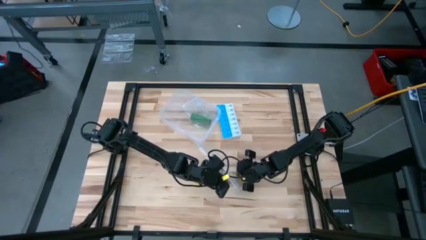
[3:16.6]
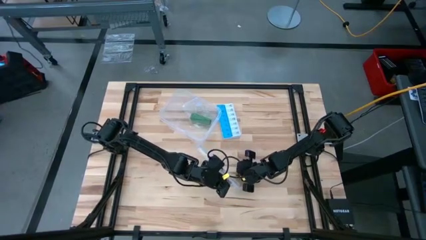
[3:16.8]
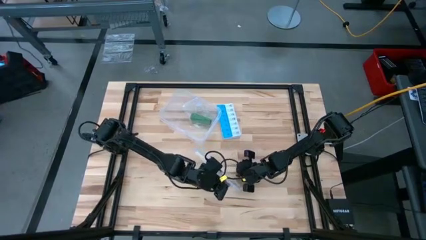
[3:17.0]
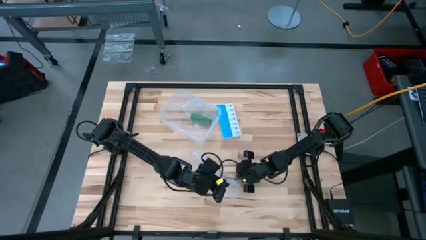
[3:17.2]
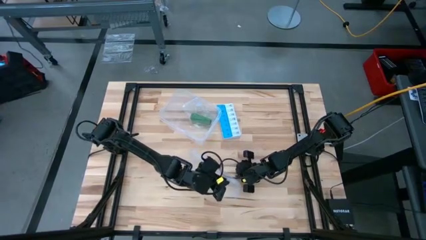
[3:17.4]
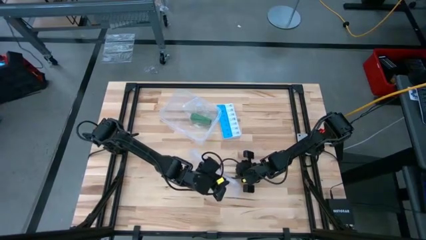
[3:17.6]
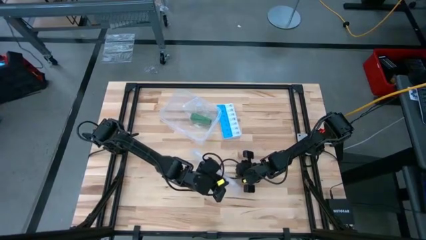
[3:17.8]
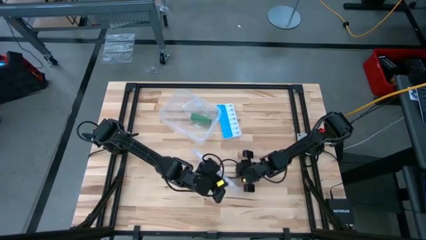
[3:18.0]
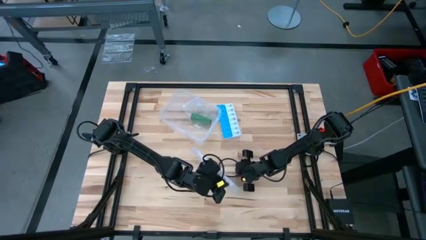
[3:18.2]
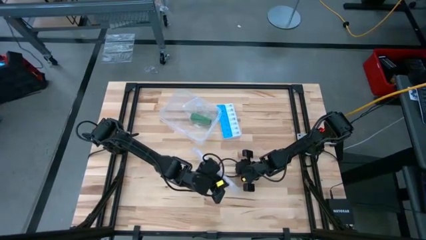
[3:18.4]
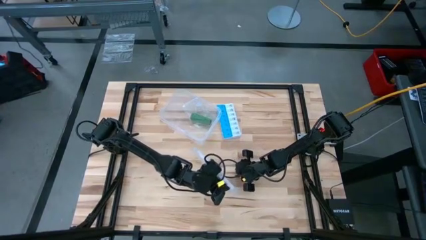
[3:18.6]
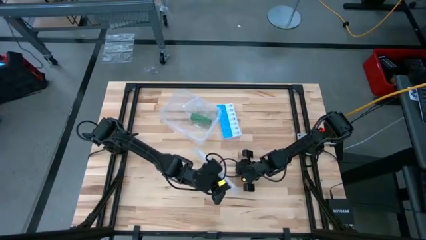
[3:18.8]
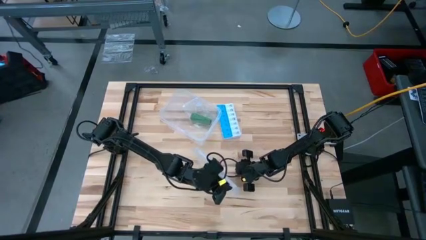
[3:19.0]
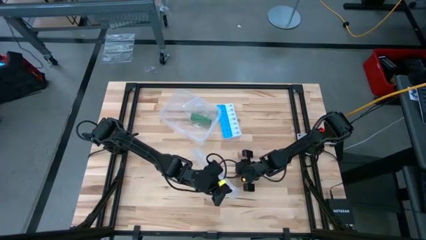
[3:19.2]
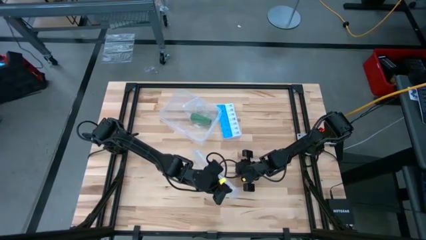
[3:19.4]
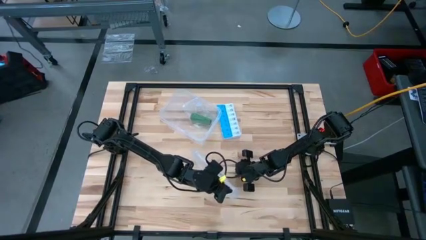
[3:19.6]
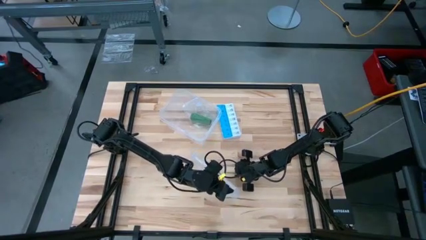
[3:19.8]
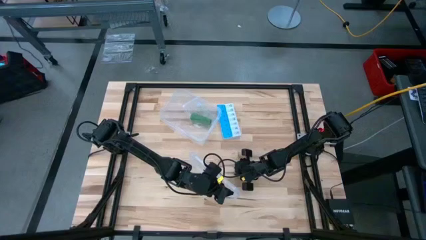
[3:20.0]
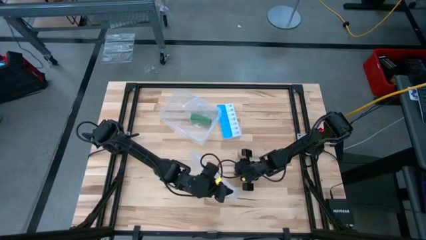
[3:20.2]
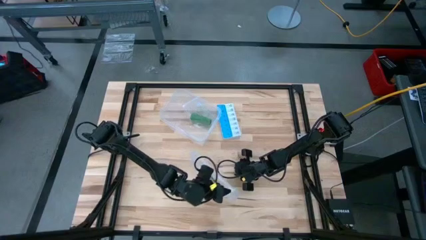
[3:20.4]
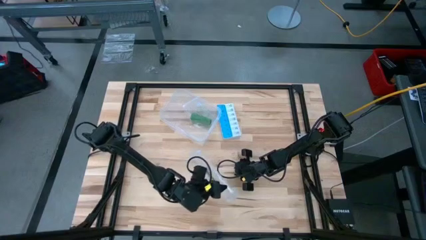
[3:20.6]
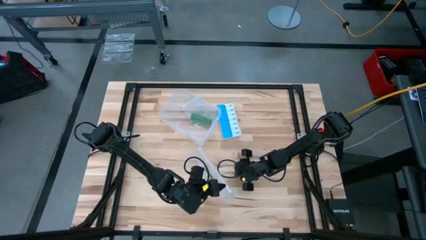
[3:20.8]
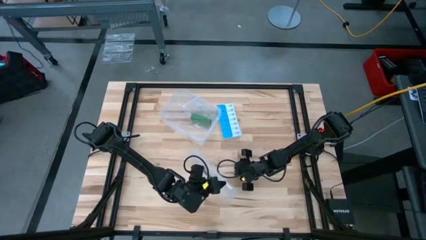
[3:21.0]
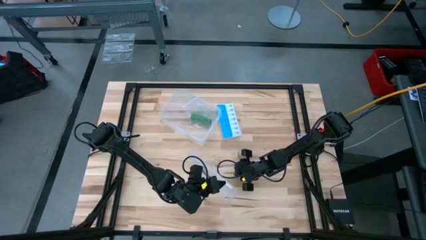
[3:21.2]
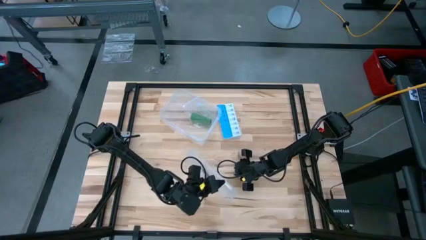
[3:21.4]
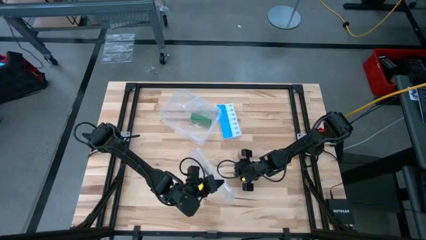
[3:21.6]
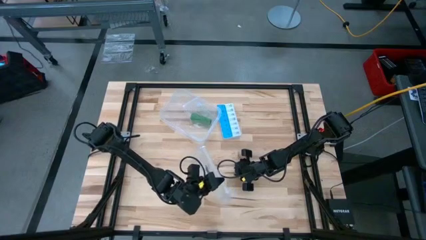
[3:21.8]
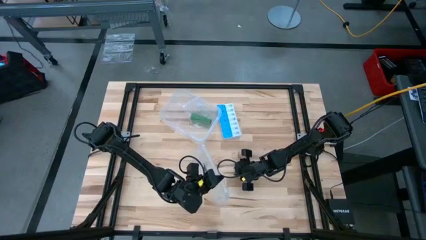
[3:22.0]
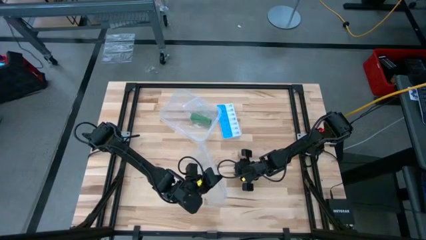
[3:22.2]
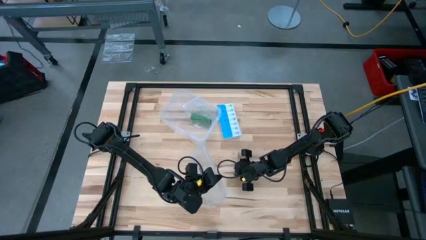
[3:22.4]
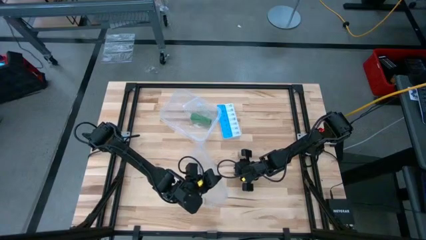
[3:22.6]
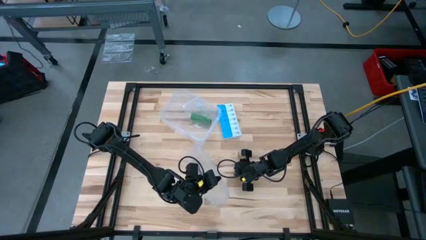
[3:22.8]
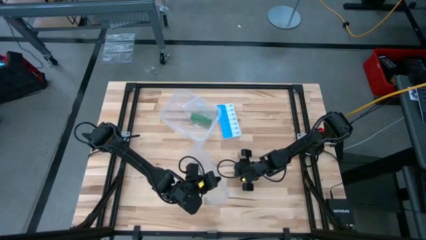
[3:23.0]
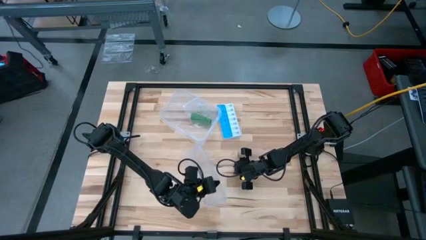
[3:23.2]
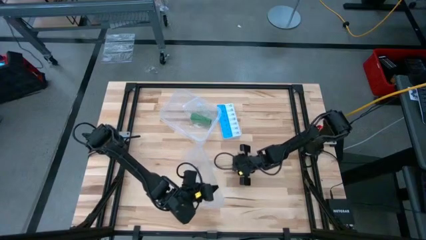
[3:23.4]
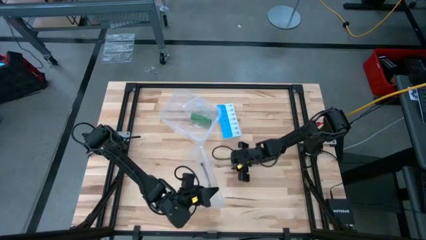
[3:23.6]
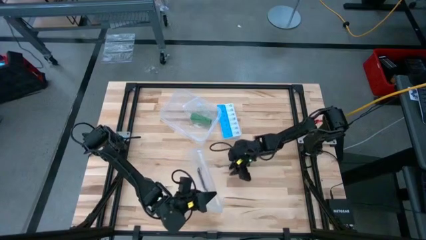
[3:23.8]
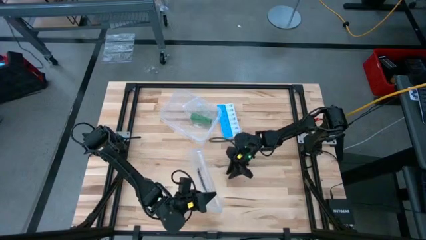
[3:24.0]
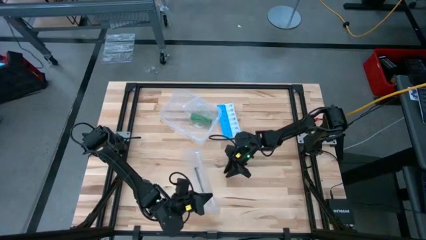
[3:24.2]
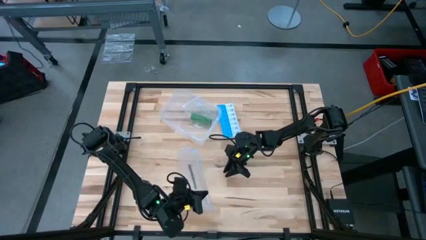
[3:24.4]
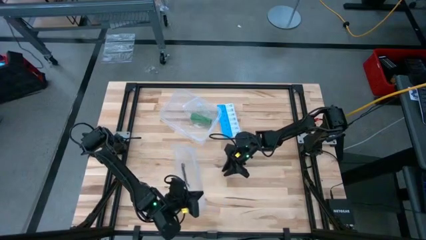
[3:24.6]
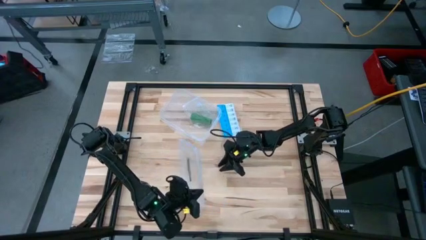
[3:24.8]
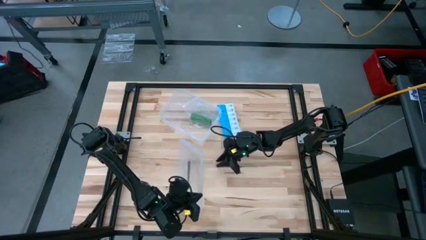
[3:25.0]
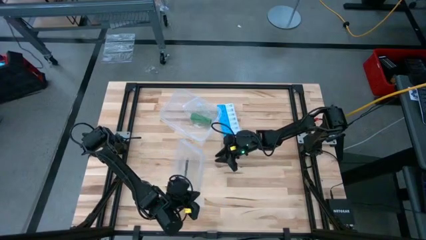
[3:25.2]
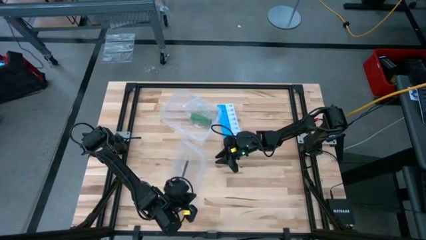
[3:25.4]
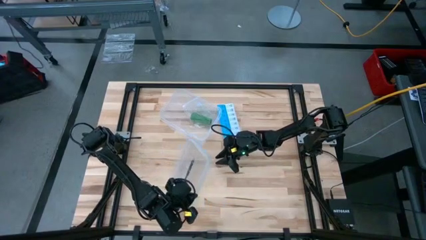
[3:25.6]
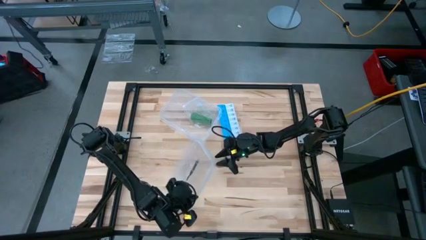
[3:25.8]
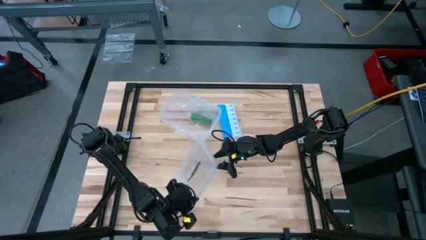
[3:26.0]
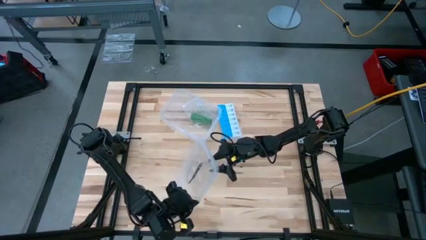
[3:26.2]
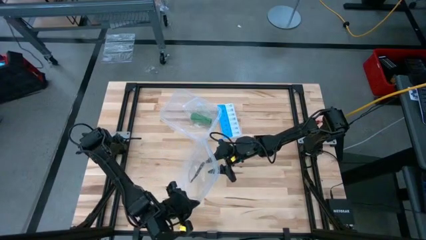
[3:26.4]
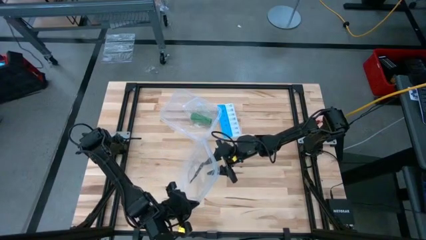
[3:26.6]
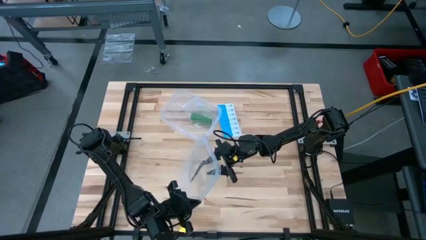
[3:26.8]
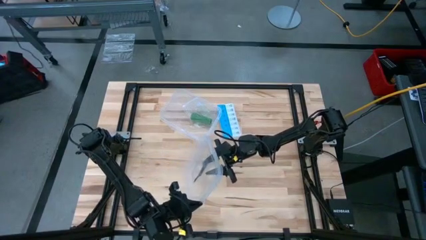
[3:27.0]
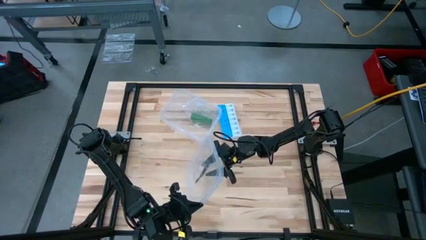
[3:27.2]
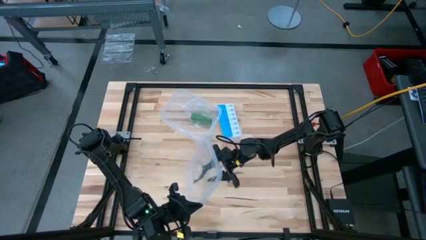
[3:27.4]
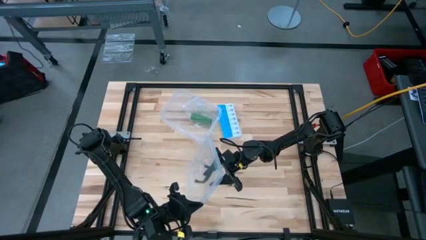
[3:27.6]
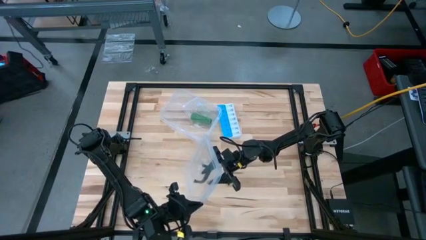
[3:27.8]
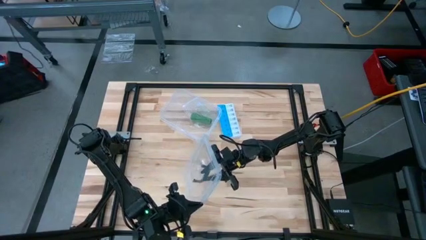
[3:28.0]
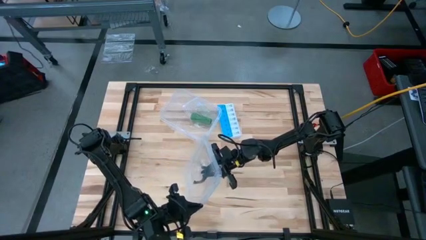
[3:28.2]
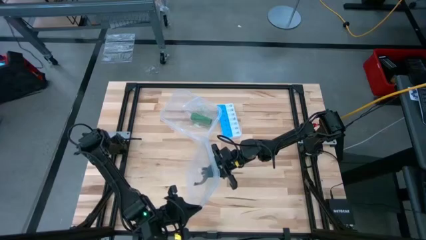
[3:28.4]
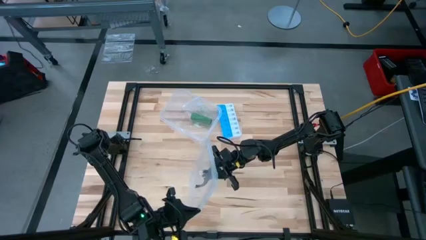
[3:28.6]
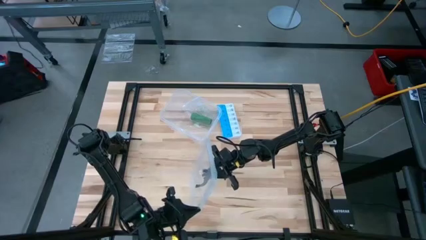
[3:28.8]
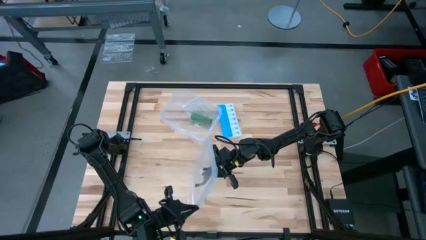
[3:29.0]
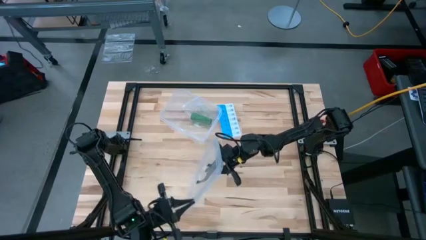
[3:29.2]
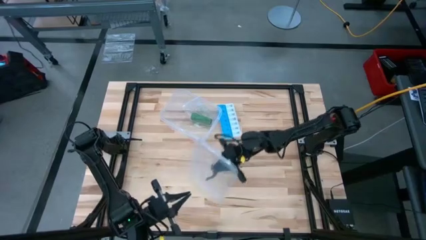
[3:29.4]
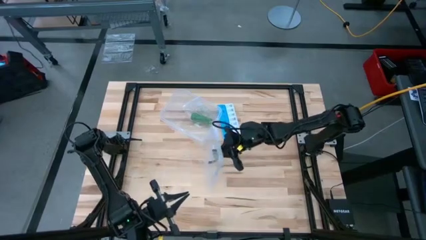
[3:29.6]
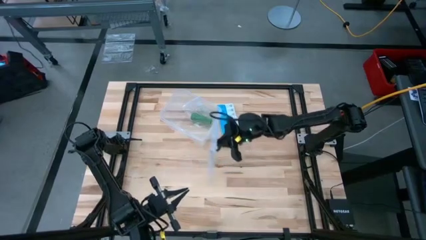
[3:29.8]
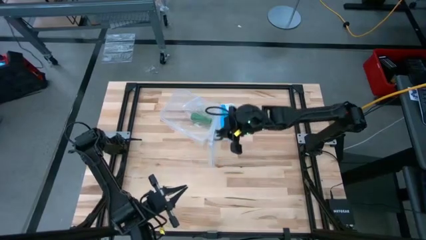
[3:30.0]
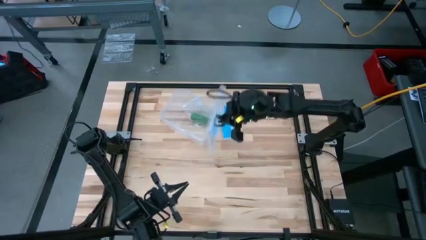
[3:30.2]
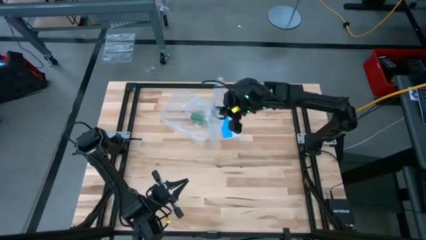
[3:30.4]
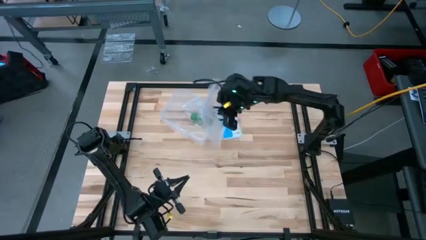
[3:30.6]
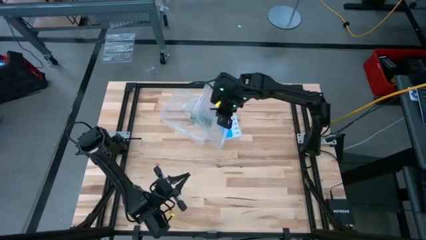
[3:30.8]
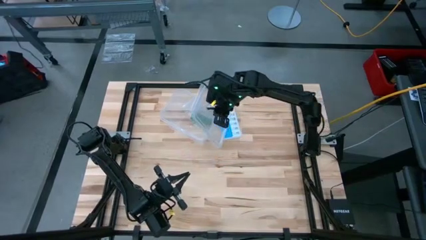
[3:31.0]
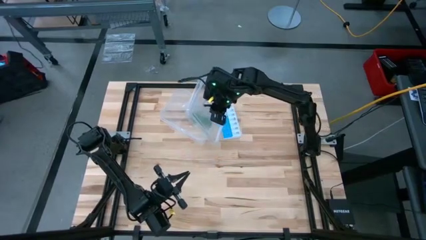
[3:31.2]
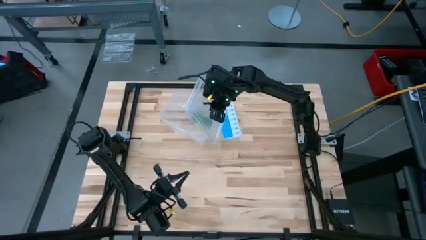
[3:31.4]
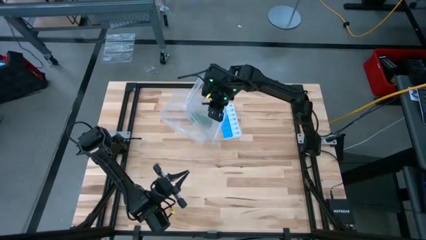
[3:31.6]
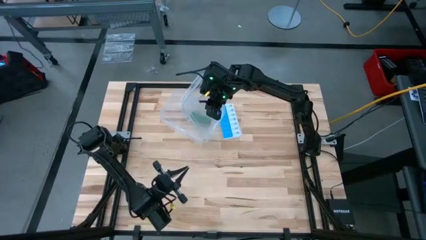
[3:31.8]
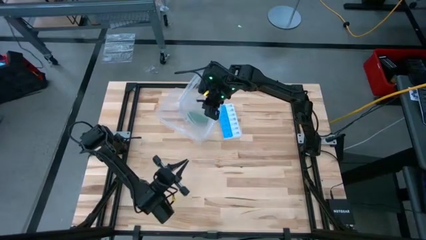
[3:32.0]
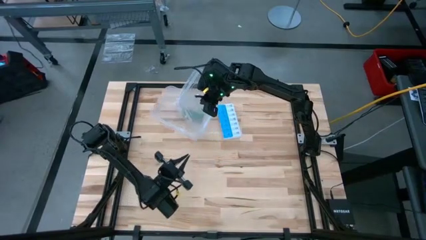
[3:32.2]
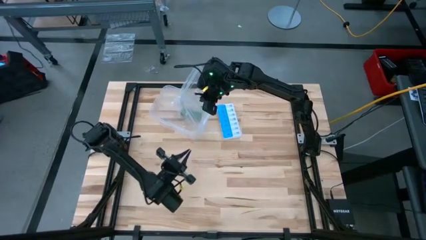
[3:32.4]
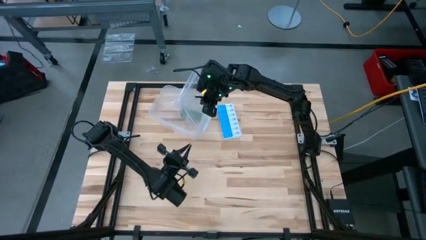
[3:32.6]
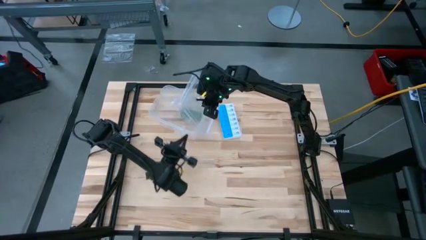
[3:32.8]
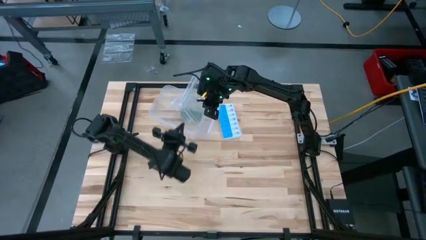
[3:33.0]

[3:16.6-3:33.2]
Task: Roll bandage
Close the transparent bin
